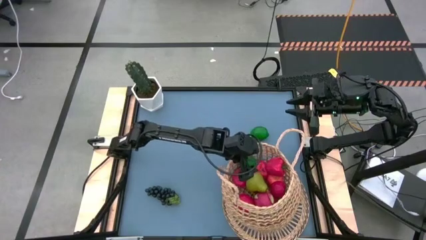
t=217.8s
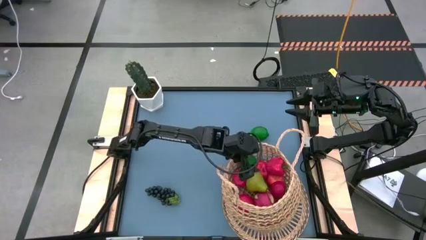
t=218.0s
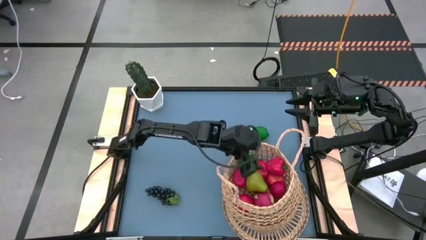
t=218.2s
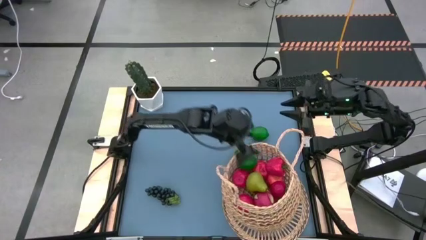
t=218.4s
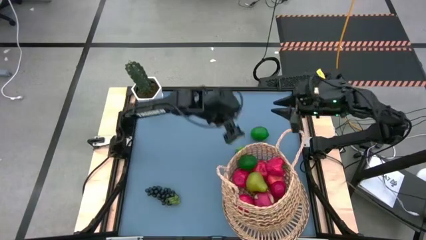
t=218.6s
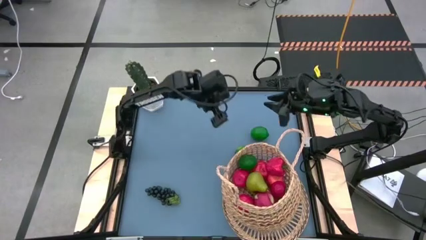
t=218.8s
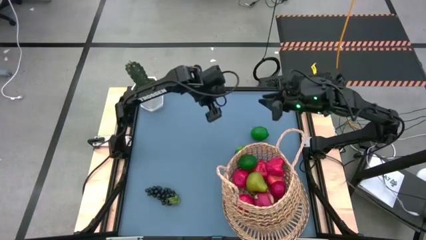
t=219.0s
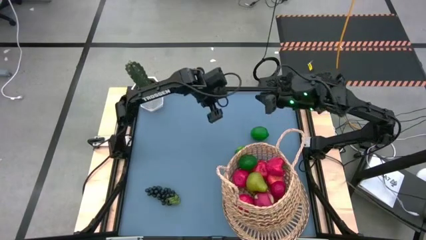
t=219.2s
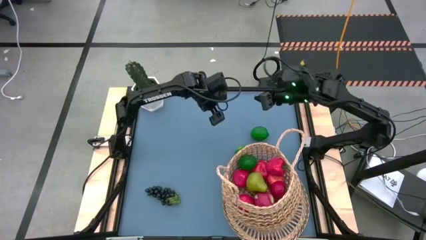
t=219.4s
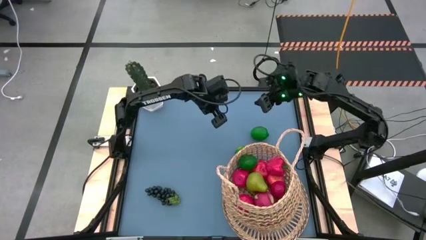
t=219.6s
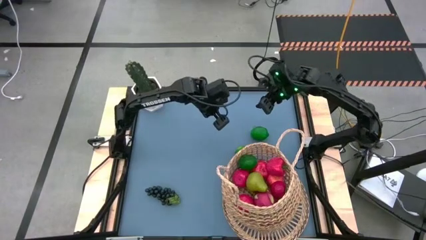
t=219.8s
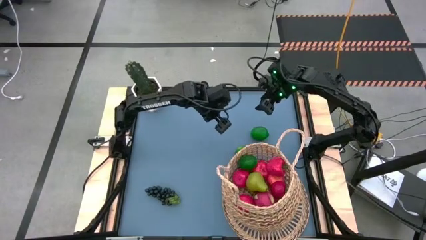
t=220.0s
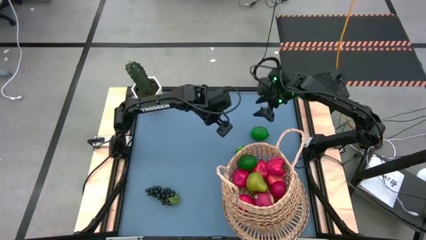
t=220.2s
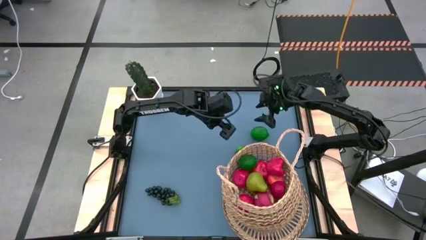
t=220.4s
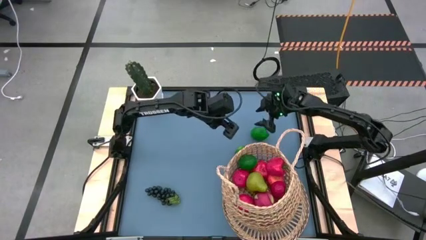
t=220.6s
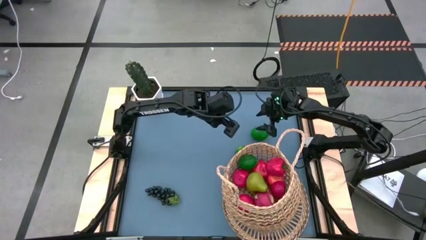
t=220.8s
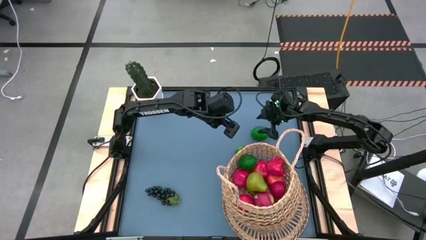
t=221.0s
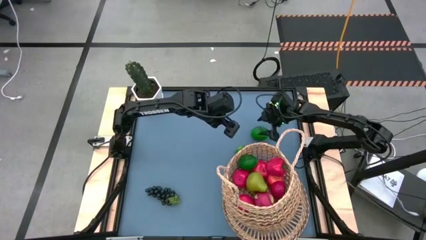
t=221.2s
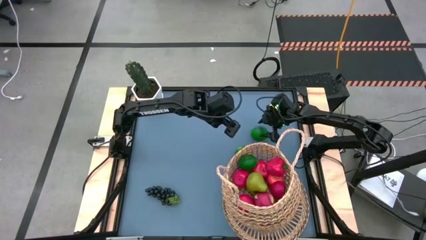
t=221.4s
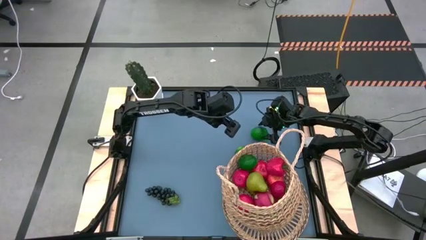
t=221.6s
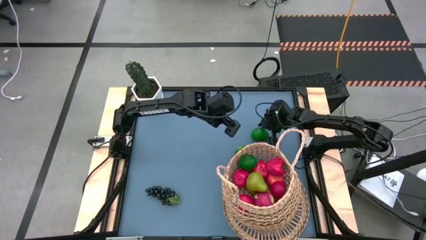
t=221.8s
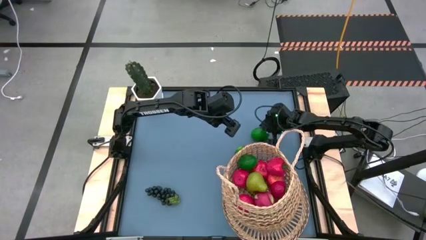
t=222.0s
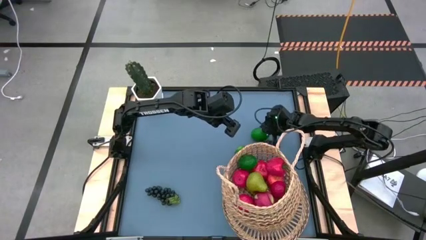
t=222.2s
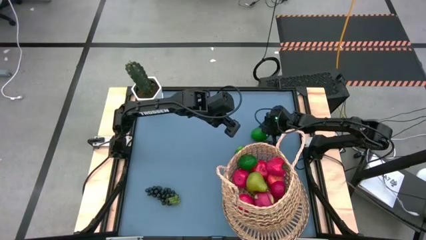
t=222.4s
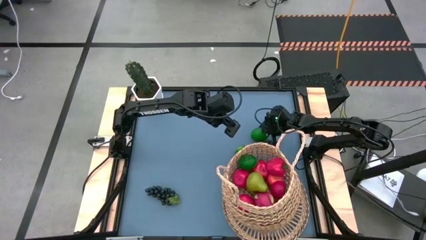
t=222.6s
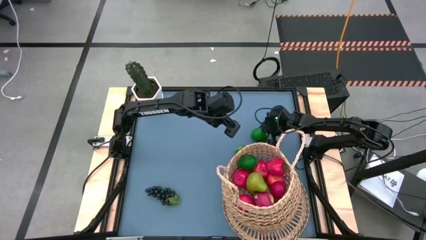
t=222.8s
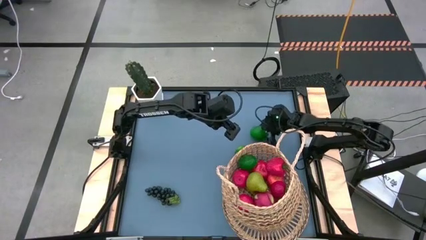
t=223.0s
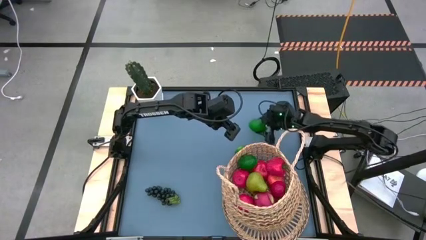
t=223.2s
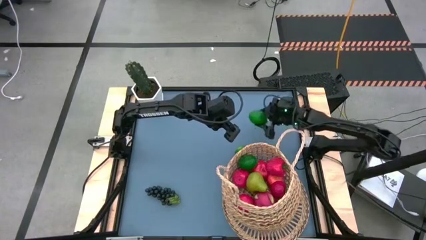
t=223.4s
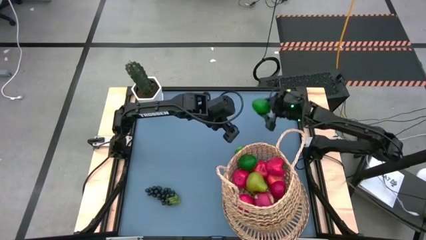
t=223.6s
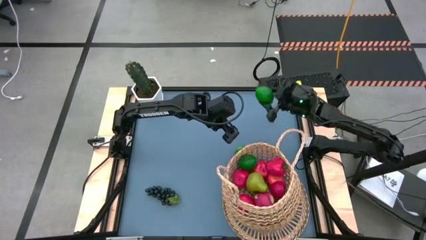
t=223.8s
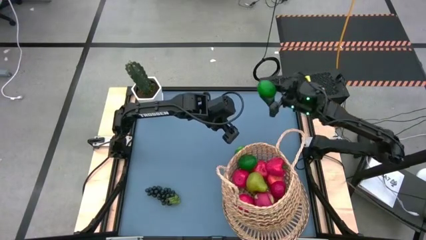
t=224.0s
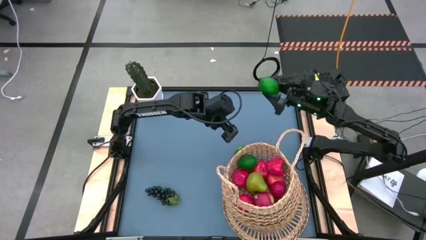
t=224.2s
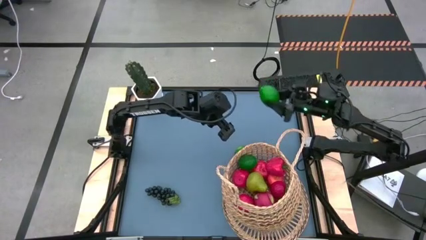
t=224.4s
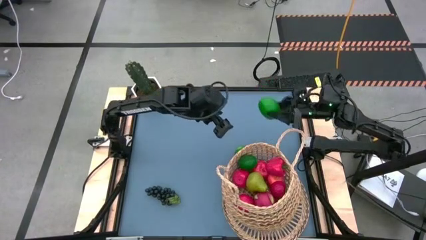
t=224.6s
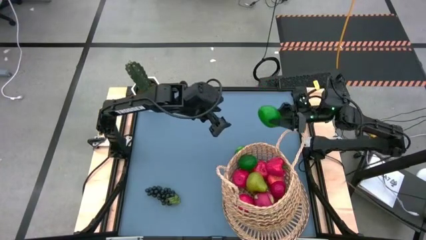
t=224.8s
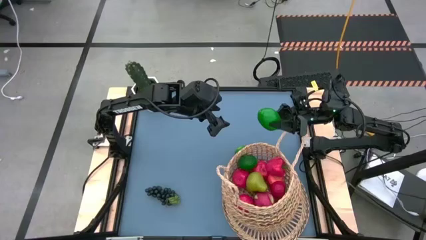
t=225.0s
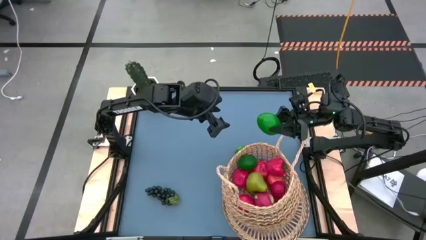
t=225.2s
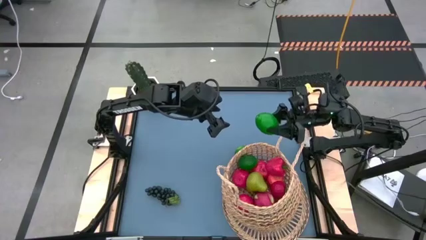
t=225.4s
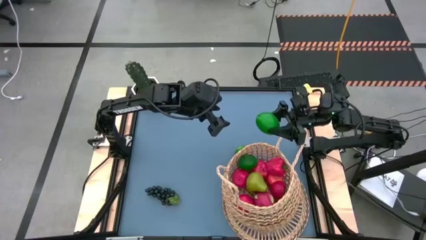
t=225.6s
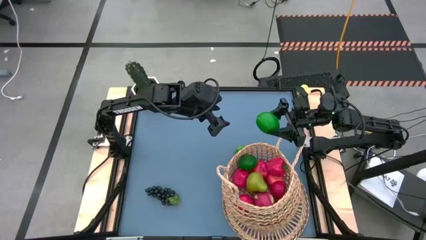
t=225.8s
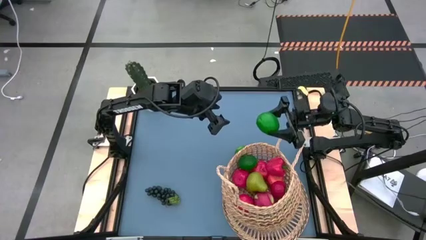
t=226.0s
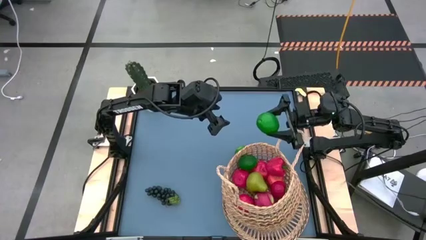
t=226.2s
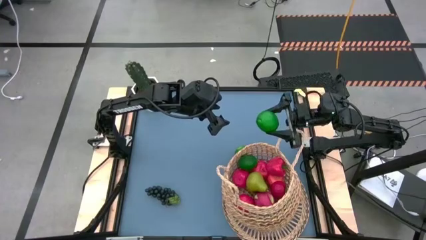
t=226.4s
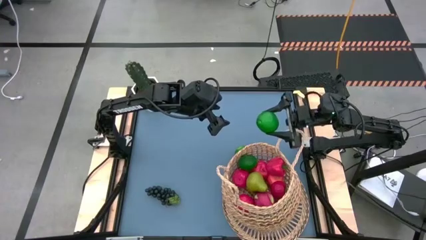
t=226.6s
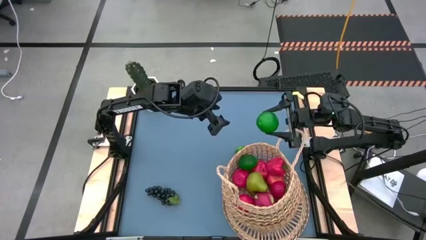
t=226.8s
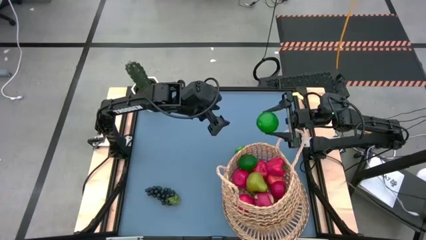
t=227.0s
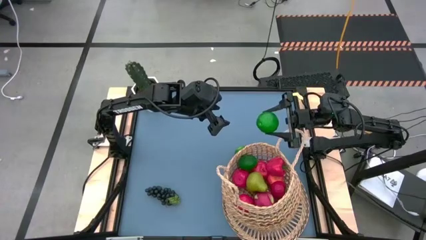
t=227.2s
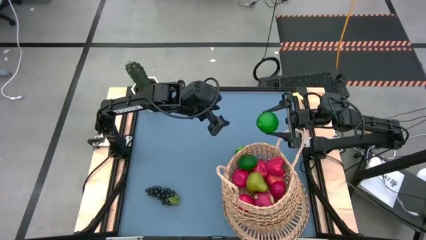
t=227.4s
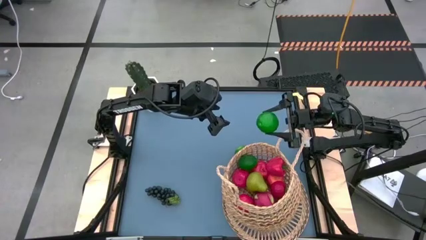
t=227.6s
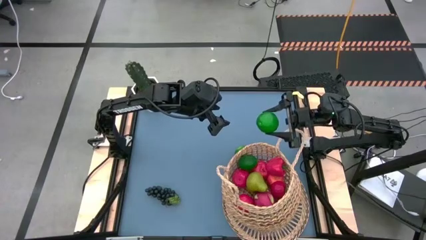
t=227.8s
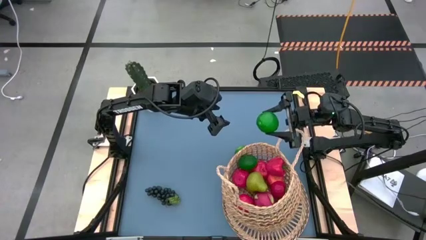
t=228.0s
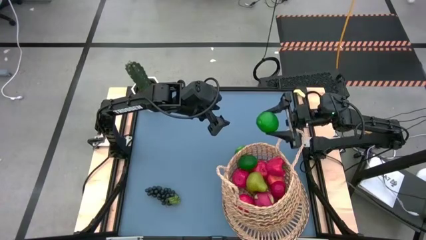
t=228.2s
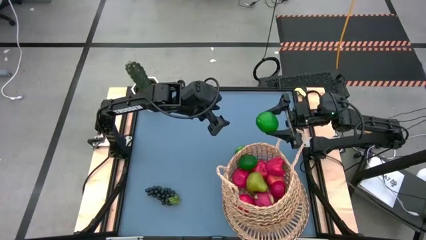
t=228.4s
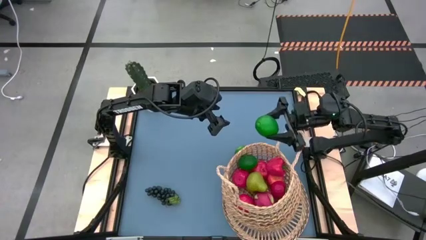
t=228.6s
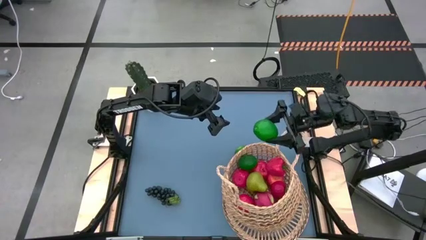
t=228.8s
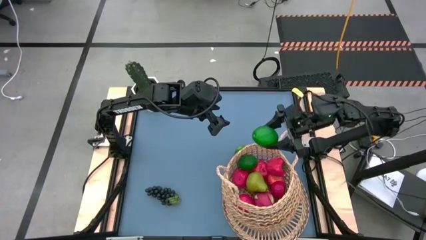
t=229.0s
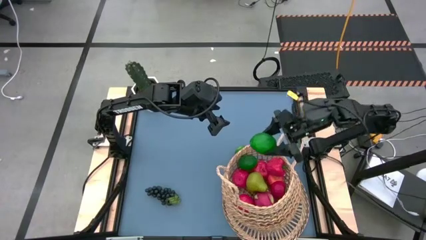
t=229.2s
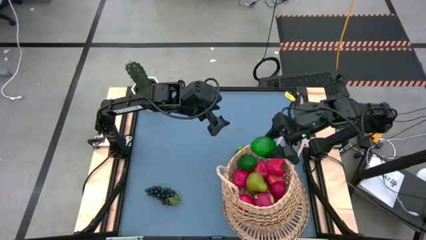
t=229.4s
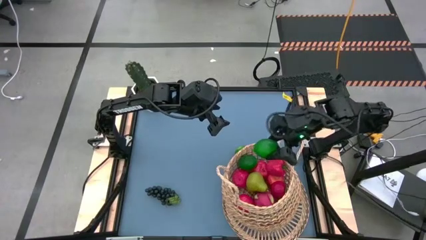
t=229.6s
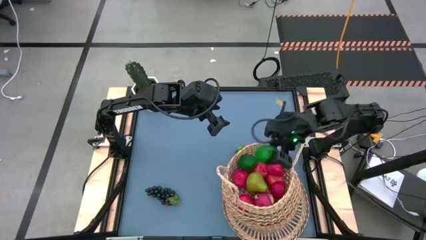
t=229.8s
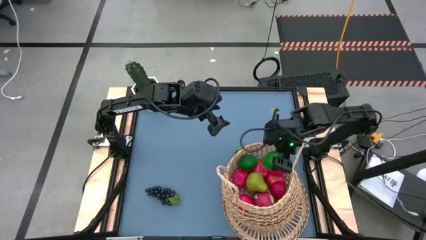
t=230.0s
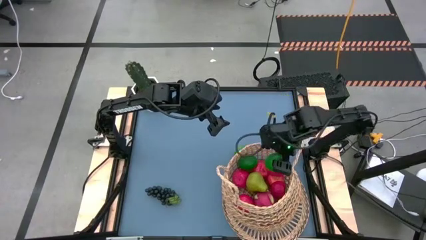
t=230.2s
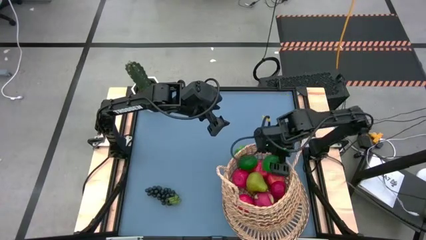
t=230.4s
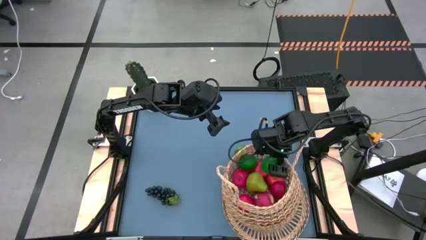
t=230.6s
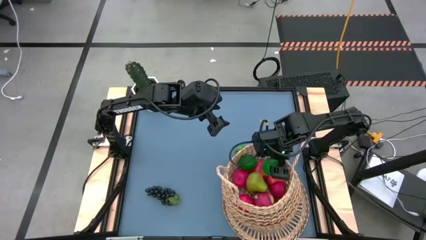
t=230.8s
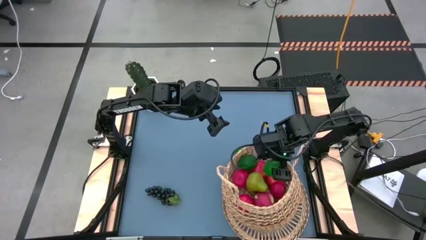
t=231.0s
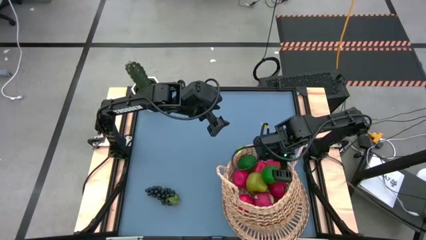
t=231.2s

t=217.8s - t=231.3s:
Task: Build produce basket
Put the green lime into the brown basket

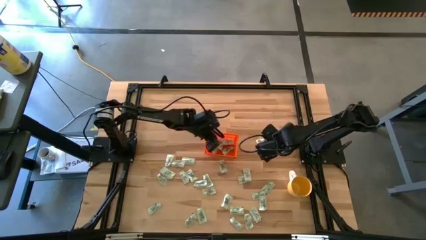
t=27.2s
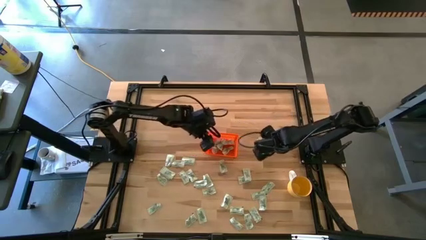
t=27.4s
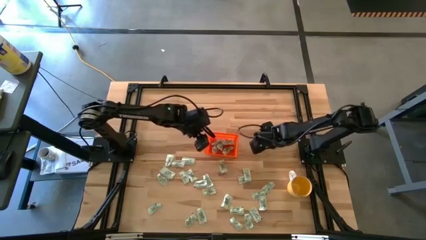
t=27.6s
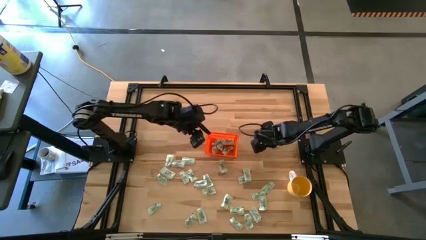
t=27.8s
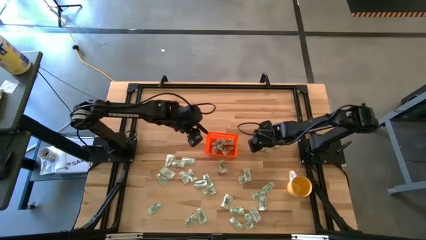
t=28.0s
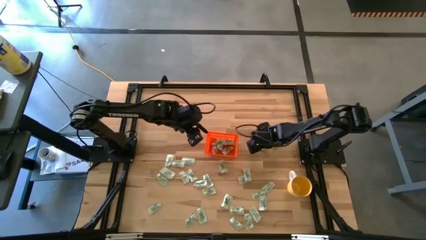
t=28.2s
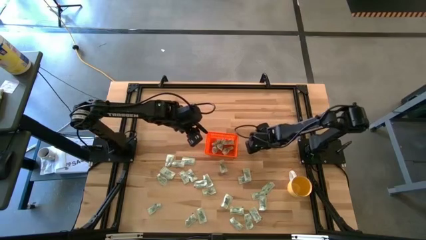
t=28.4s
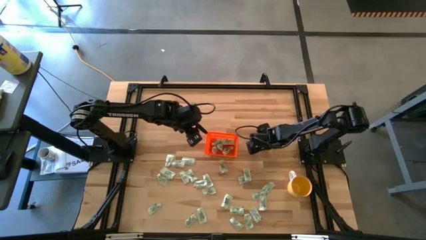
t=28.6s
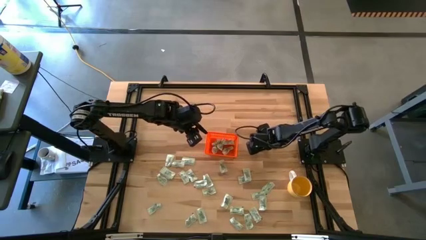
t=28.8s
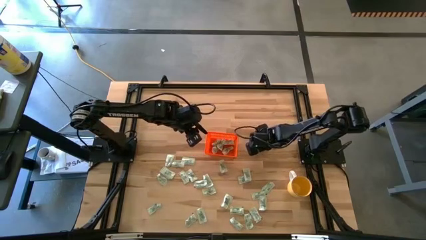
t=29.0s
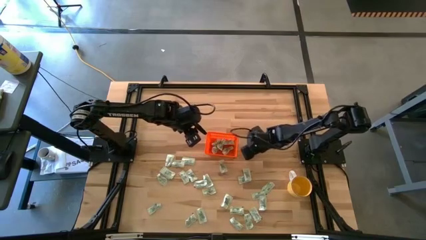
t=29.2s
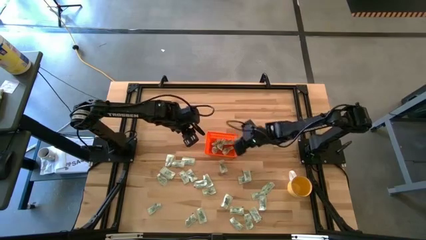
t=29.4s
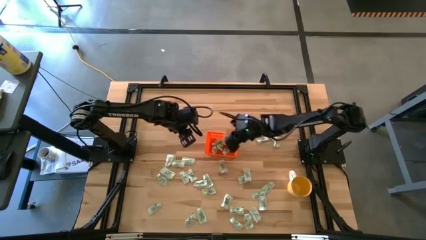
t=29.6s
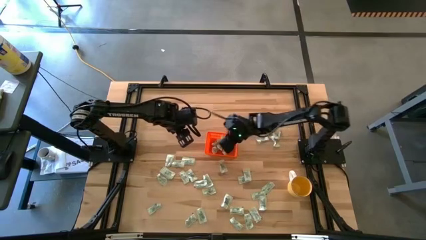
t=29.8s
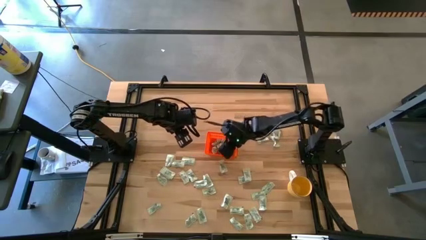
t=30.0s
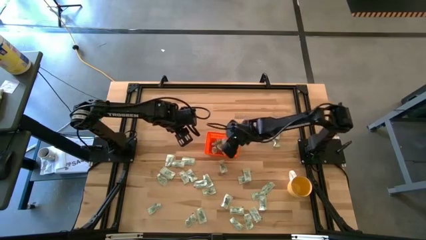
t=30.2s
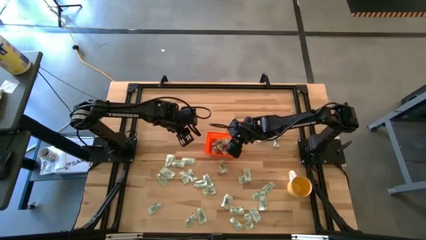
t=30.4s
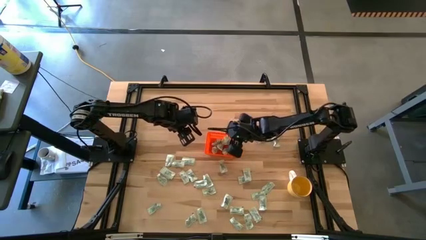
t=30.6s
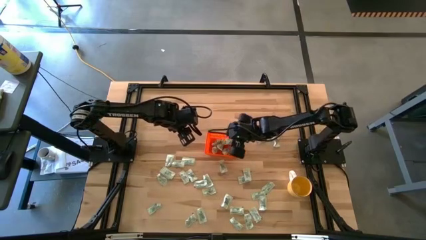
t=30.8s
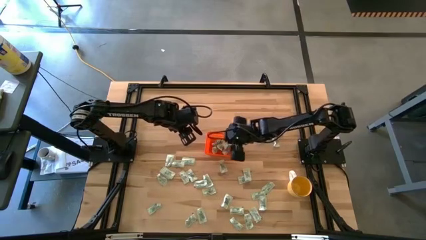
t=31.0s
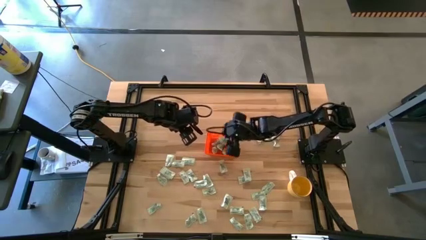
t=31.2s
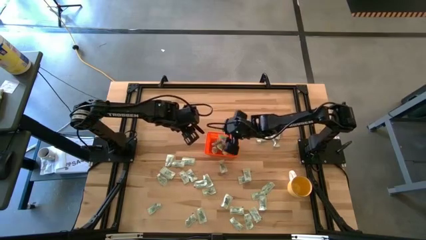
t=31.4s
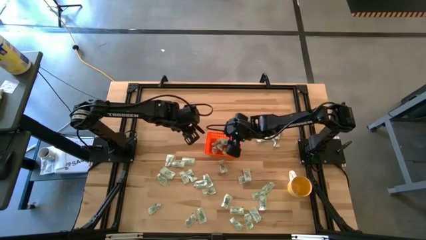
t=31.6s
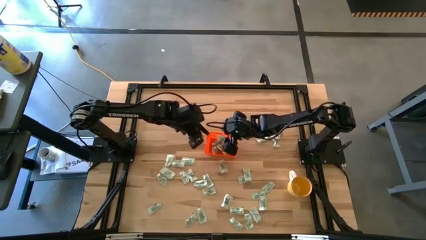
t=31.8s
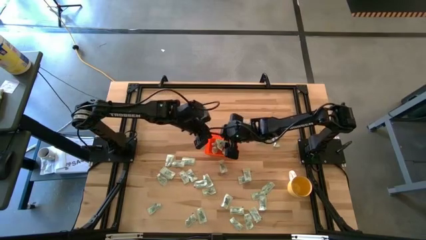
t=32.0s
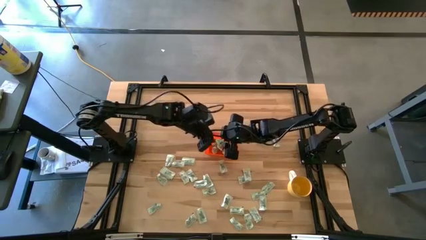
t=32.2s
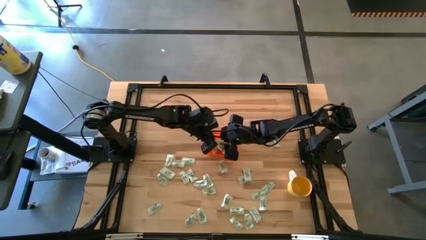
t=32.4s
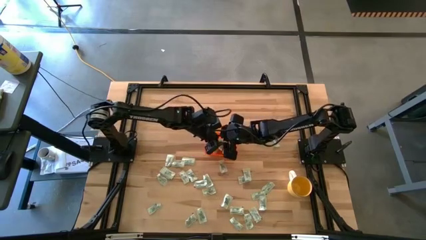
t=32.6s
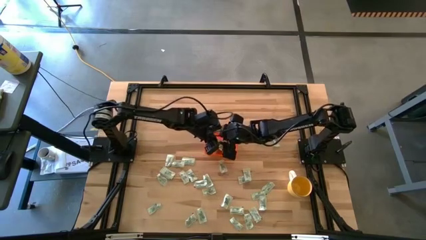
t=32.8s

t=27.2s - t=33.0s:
Task: Pick and place Stevia / Truvia into bins
Put the light green stevia packet into the orange bin
